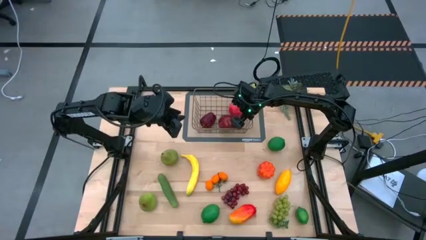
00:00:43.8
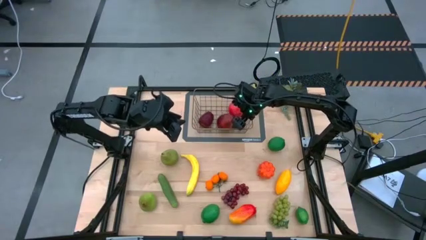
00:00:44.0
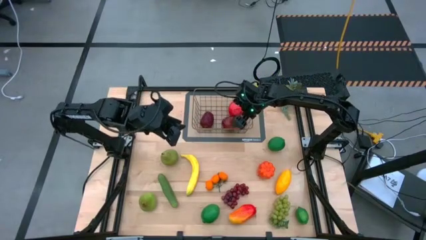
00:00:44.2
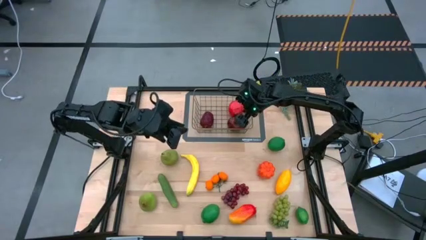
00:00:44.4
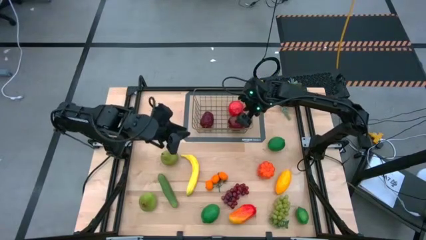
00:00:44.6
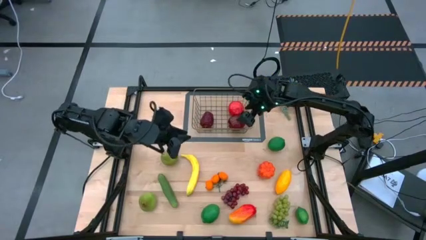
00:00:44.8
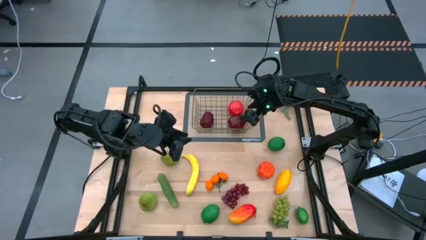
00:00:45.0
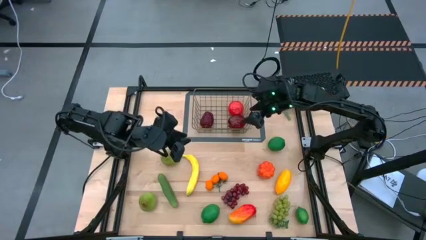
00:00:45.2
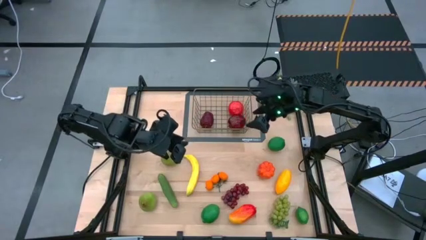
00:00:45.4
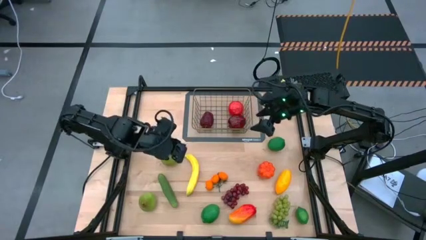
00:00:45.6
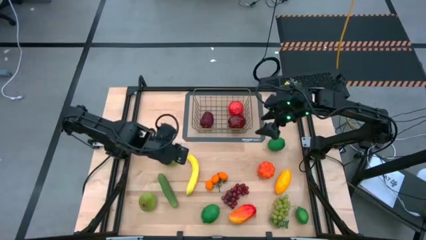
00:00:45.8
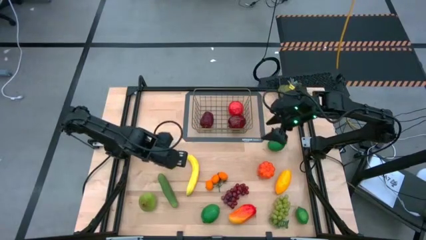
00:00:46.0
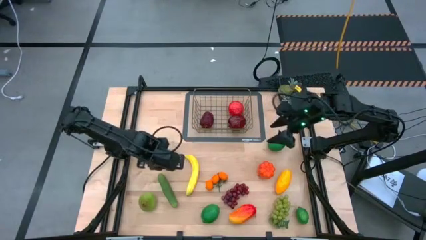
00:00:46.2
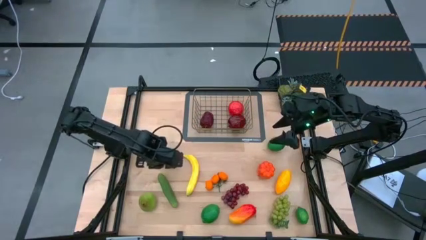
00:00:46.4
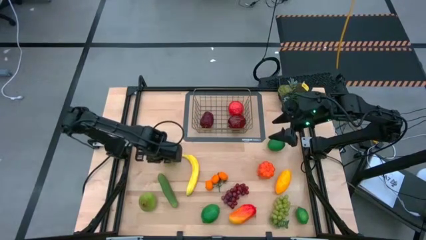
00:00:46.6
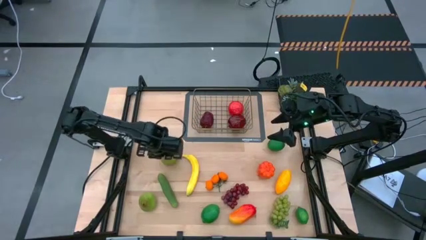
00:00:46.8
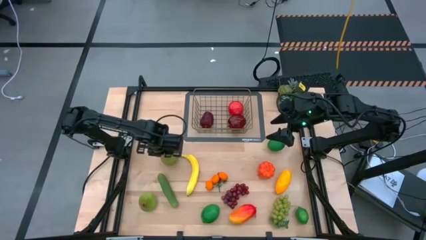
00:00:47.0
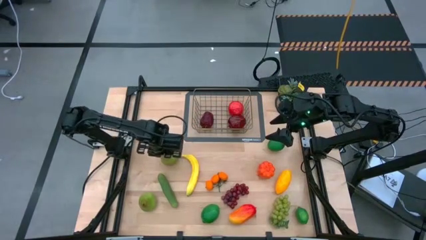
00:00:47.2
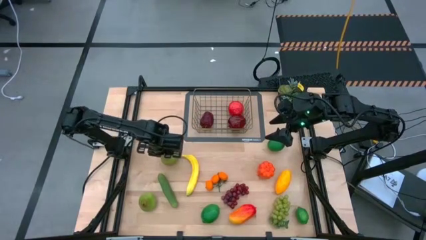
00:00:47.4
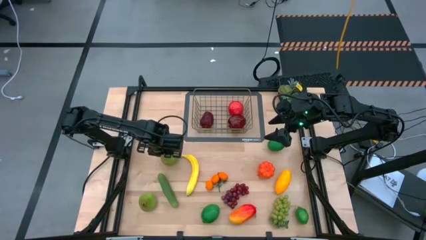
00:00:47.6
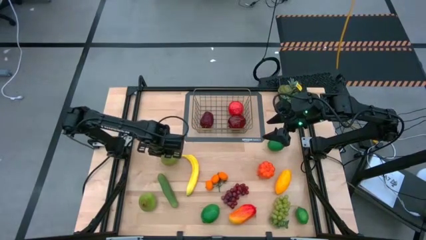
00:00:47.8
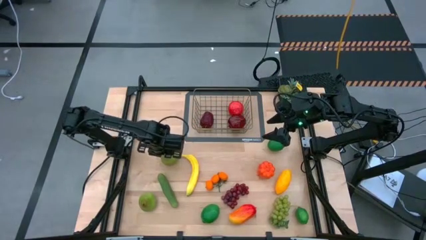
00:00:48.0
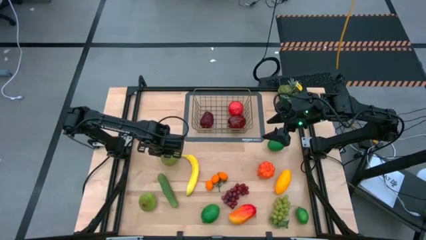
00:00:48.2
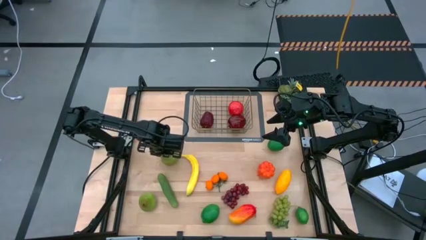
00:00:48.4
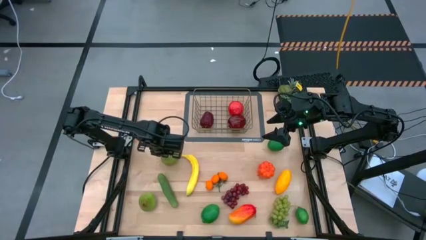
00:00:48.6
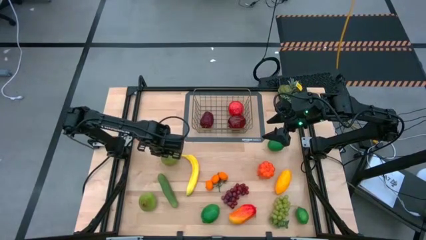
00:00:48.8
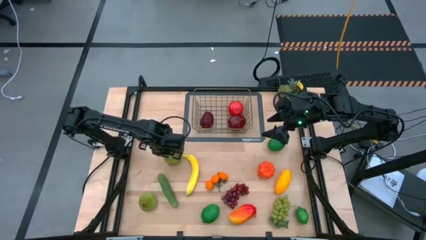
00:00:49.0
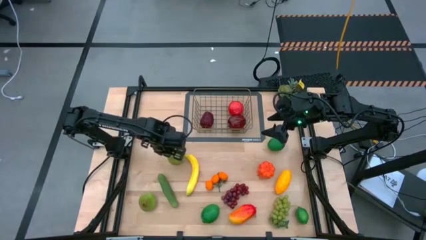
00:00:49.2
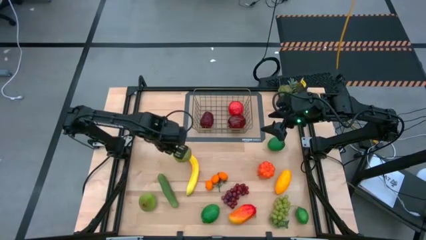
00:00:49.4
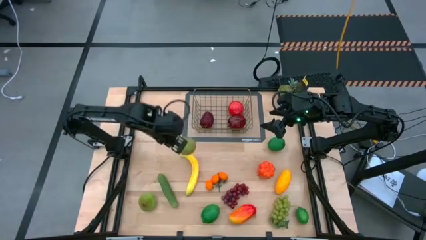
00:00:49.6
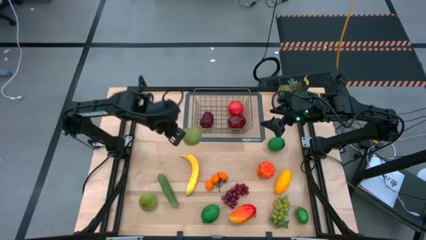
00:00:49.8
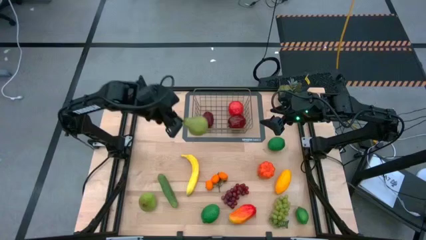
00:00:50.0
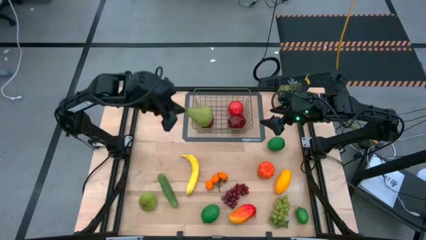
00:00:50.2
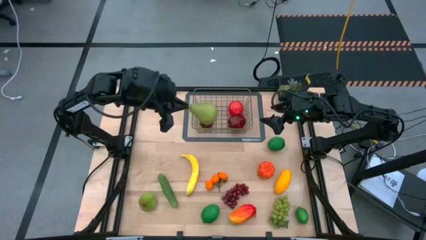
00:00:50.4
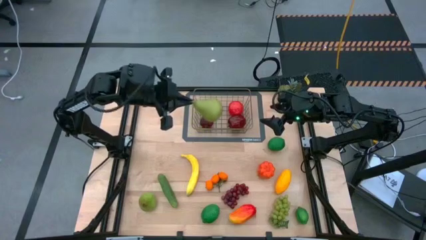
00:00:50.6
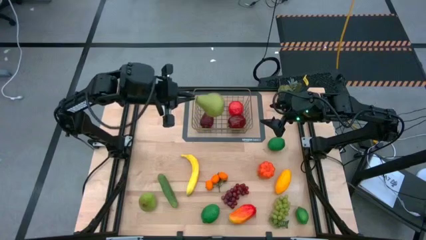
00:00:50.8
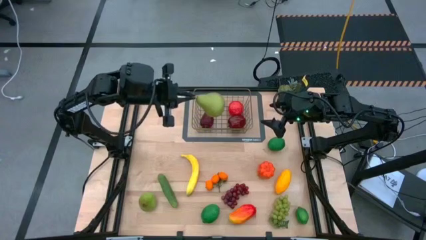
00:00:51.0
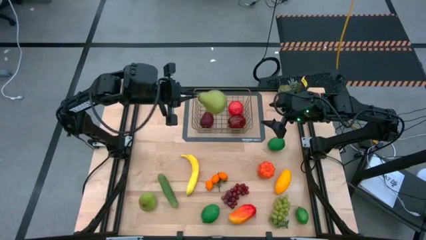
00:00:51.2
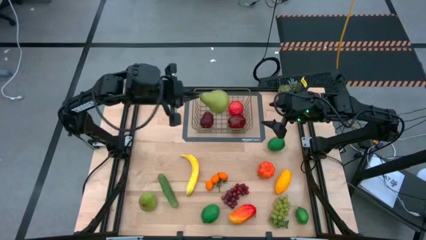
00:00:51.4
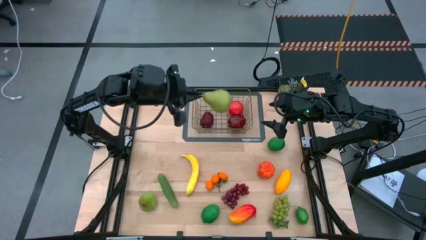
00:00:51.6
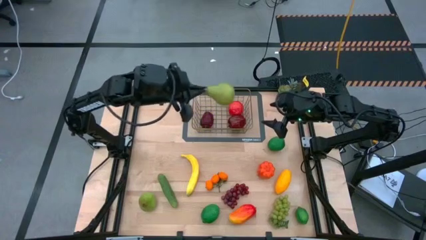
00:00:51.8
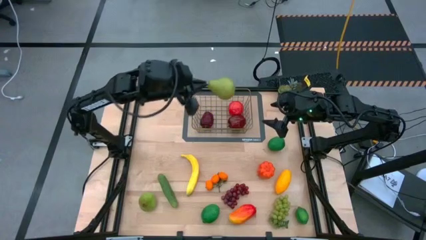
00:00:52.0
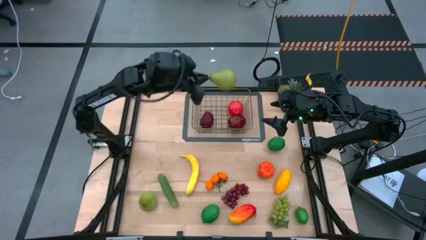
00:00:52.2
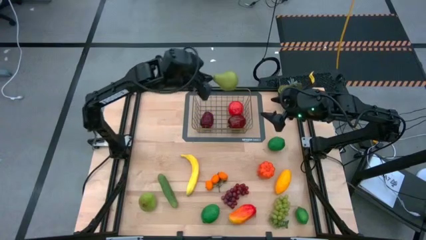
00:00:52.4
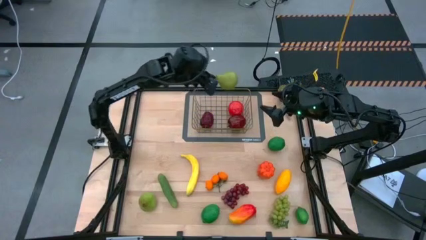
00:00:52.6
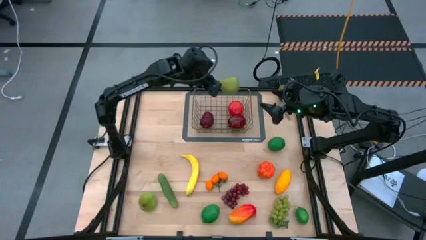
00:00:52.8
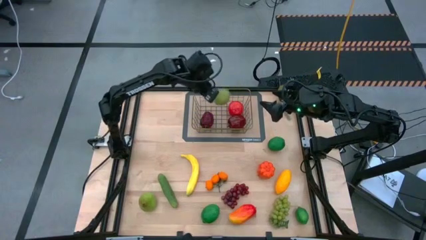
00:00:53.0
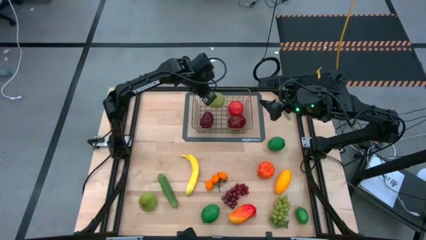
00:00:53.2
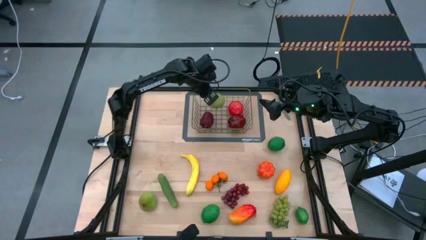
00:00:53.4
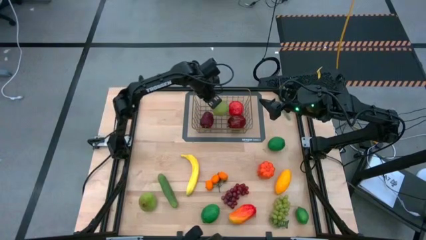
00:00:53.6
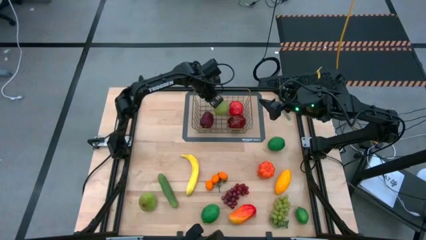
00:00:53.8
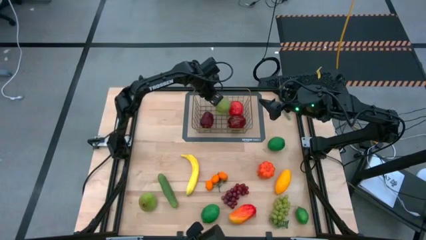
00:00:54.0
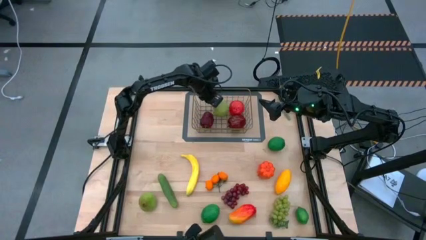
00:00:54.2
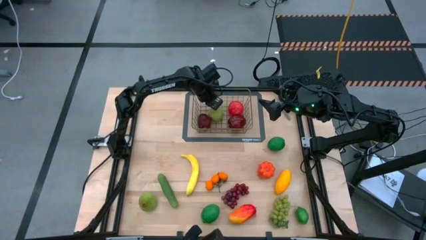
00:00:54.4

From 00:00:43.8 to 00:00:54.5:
Task: Build produce basket
Put the top green pear into the brown wire basket

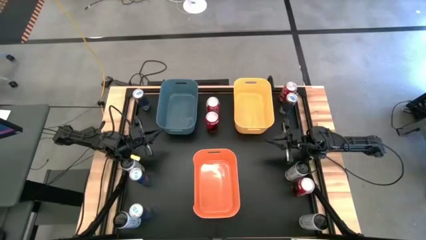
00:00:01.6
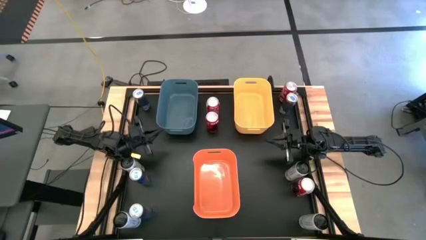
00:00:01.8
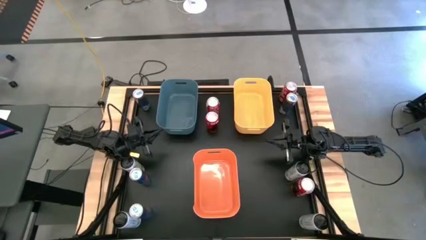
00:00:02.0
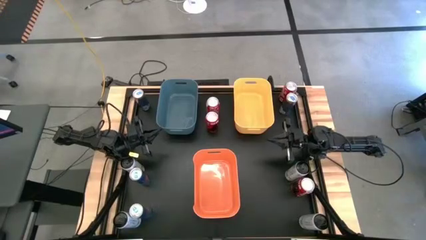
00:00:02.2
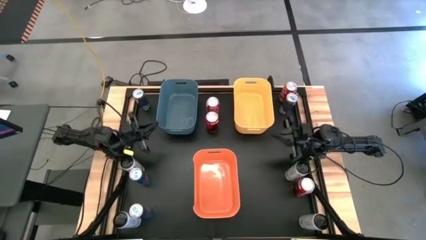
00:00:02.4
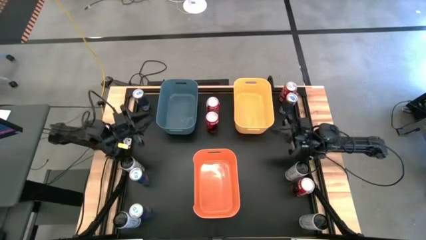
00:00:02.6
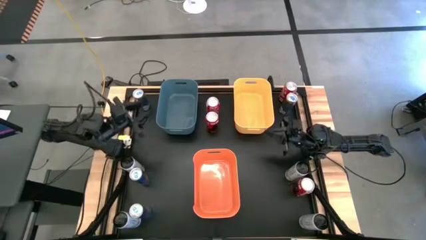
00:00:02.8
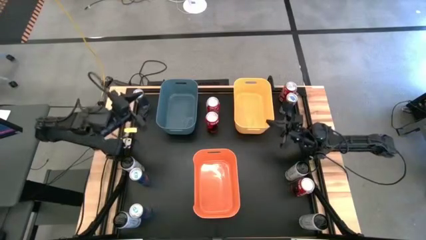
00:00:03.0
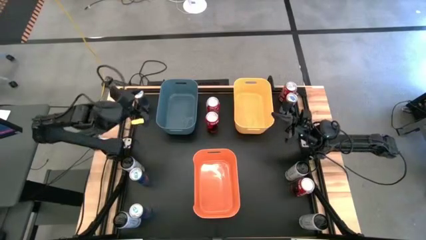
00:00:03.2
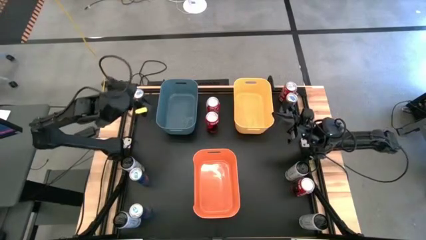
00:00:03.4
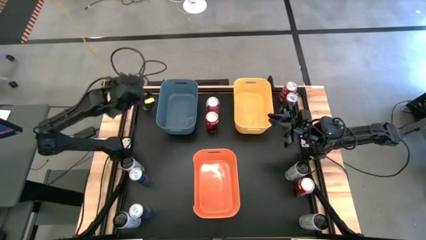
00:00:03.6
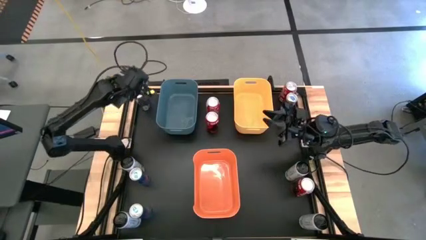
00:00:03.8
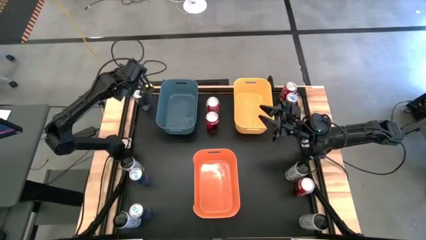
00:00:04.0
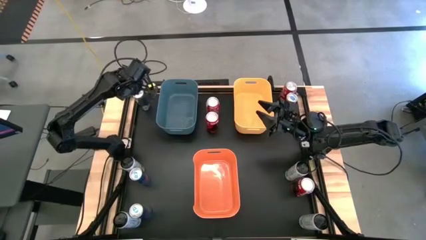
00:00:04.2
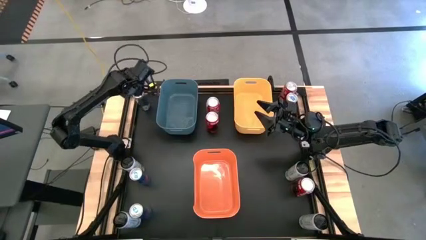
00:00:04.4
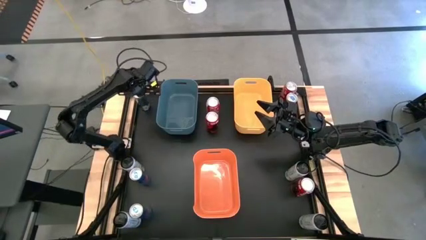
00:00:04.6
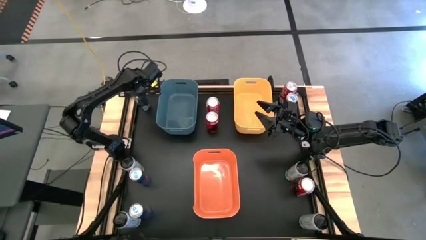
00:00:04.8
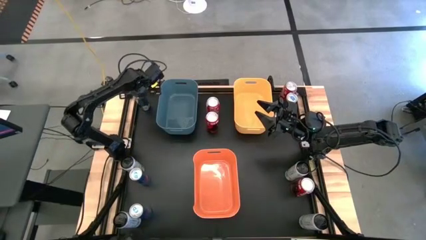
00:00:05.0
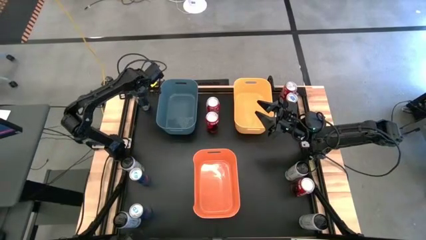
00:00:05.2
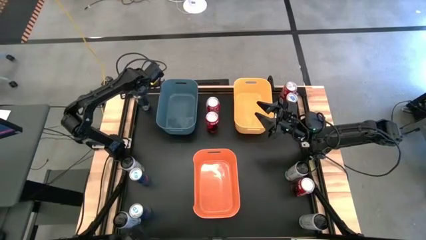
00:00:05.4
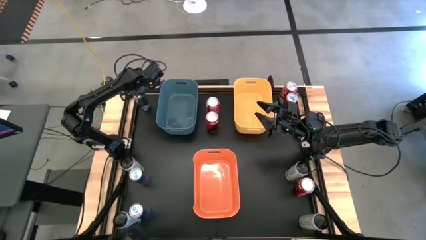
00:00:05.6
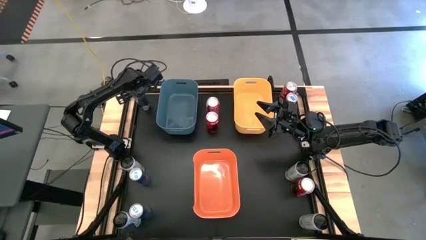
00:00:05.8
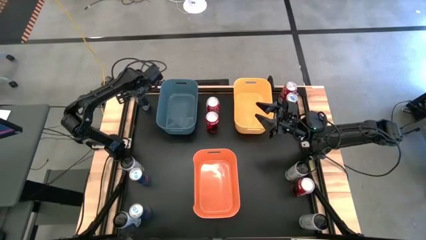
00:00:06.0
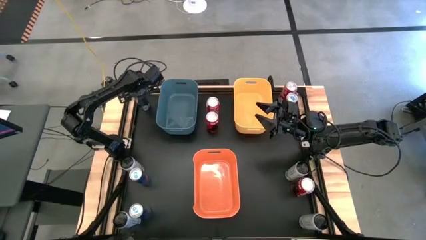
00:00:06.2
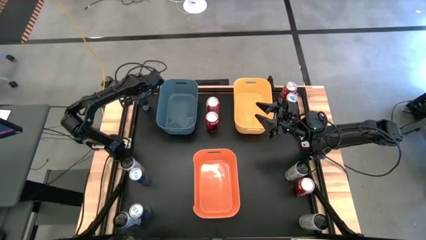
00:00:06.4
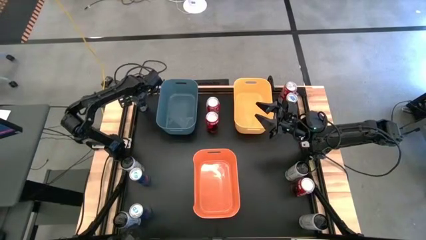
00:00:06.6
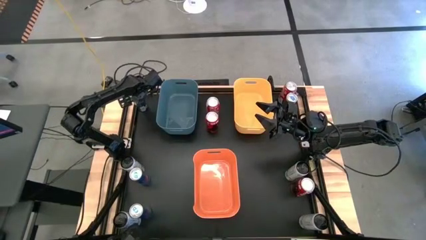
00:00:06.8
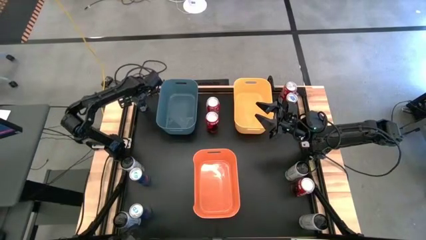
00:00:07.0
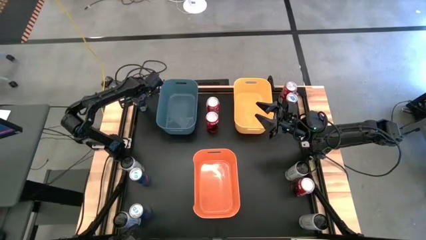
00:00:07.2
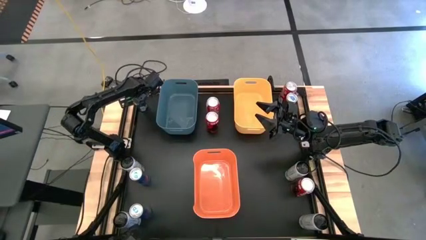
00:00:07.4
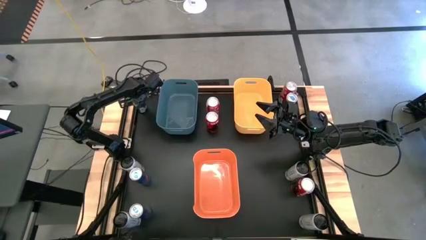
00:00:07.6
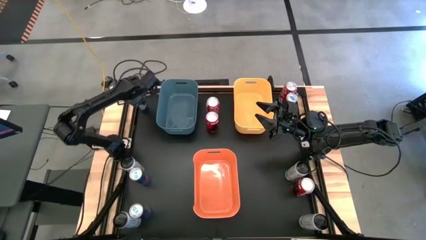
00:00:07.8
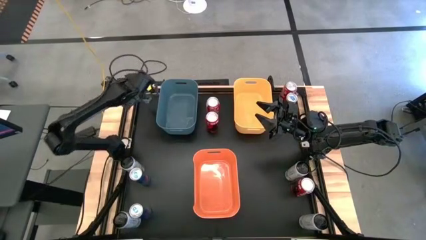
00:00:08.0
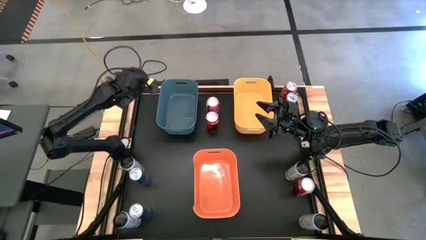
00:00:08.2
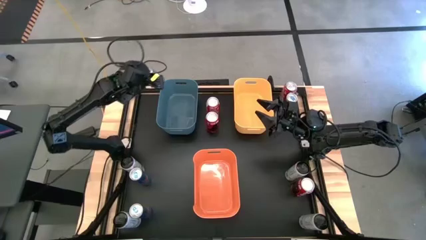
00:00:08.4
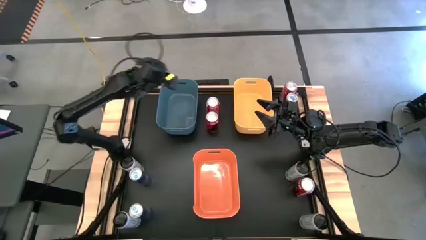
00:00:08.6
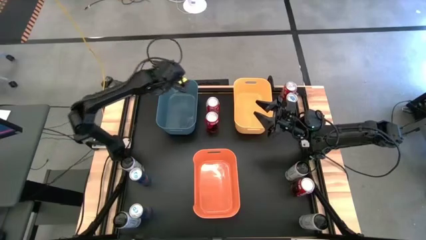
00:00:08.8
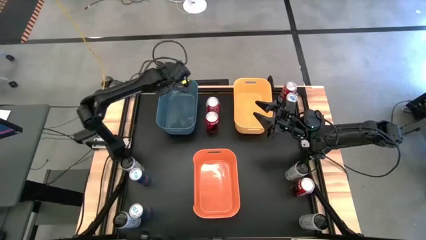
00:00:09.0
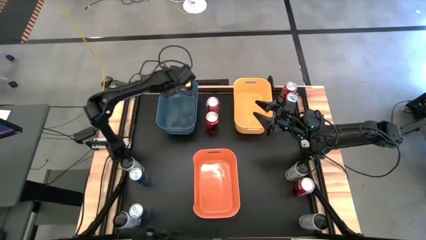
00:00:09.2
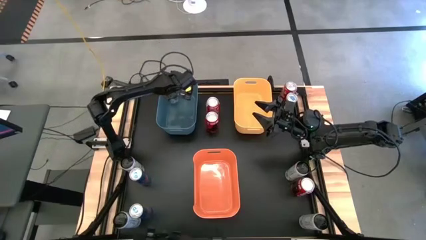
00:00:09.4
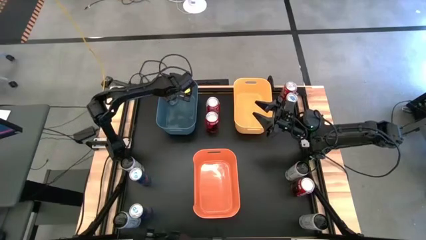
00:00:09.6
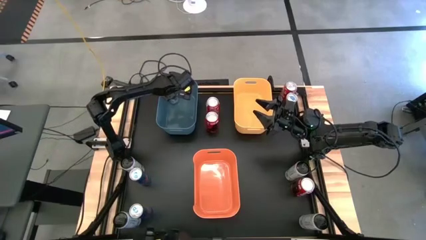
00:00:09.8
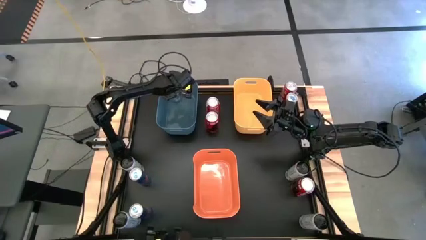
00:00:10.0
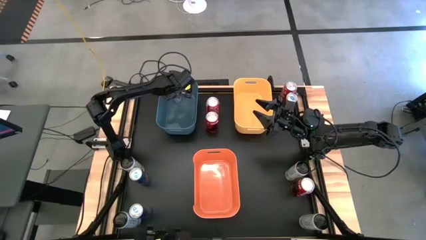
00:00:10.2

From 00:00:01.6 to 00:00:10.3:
Task: Sort soda cans
Put the top left blue soda can into the blue bin
